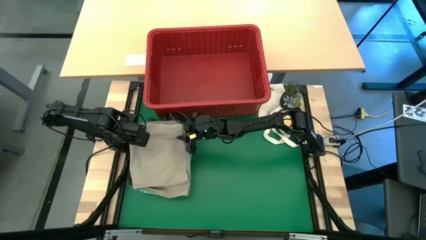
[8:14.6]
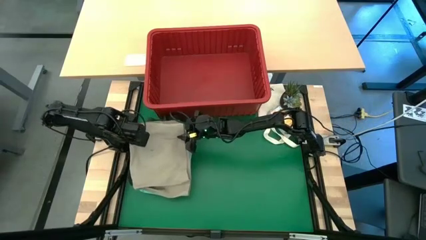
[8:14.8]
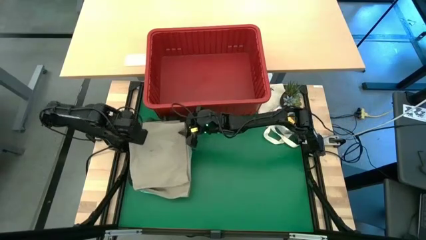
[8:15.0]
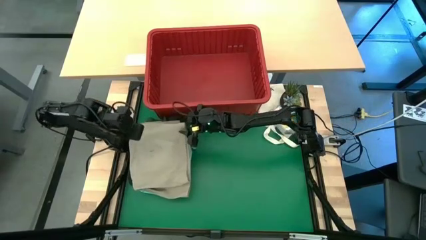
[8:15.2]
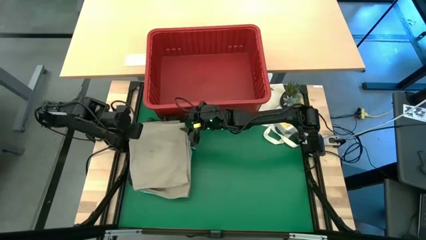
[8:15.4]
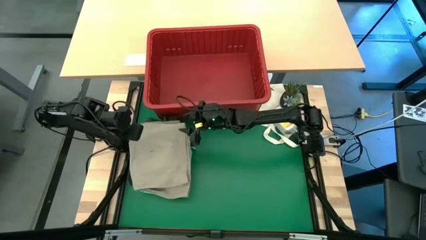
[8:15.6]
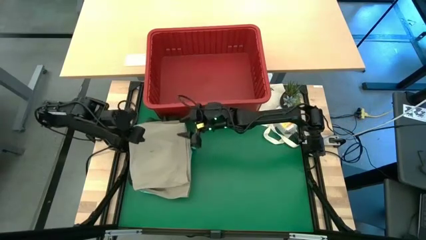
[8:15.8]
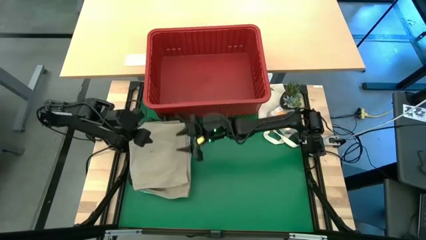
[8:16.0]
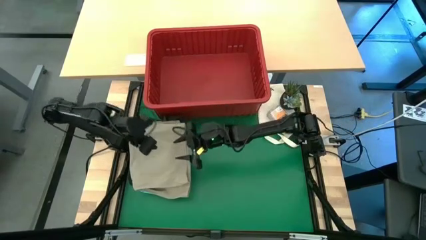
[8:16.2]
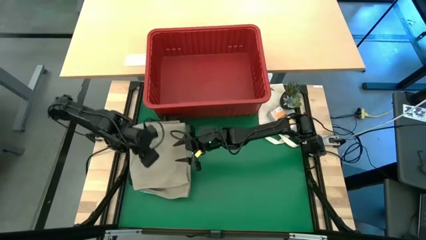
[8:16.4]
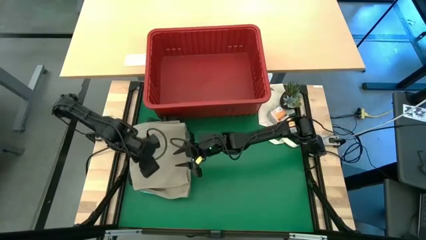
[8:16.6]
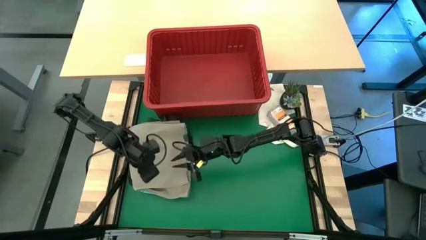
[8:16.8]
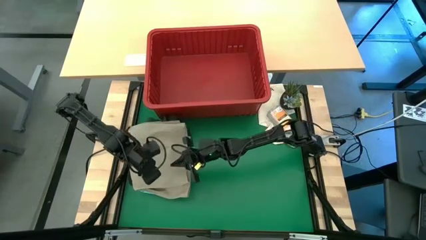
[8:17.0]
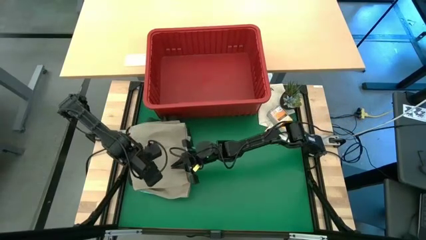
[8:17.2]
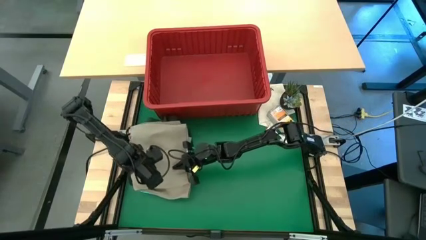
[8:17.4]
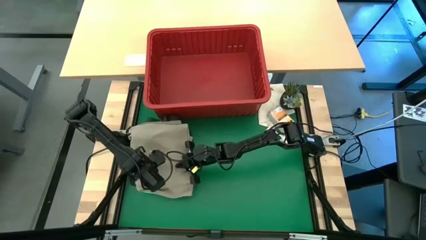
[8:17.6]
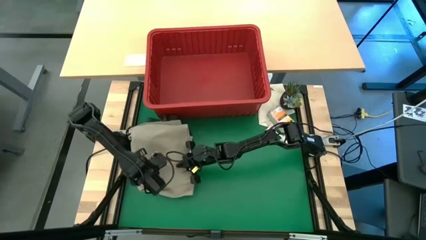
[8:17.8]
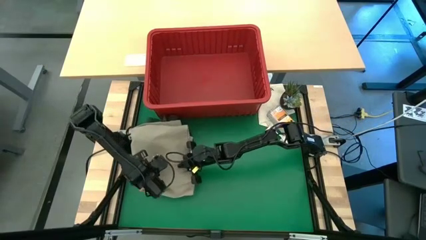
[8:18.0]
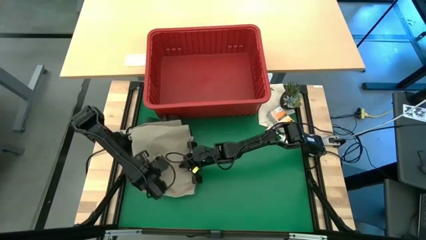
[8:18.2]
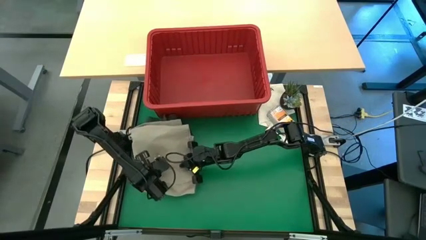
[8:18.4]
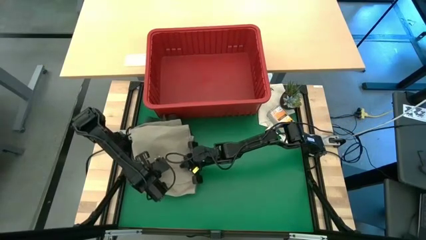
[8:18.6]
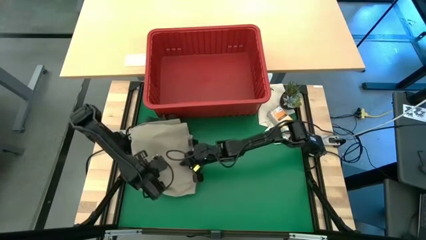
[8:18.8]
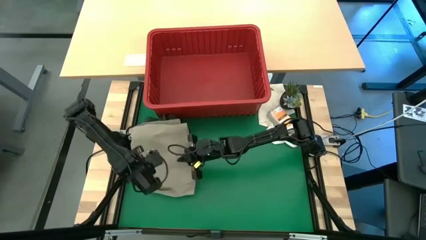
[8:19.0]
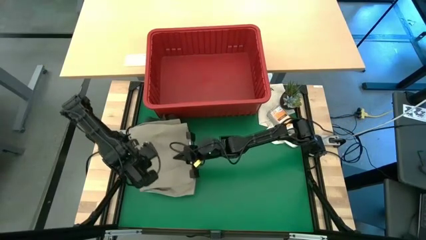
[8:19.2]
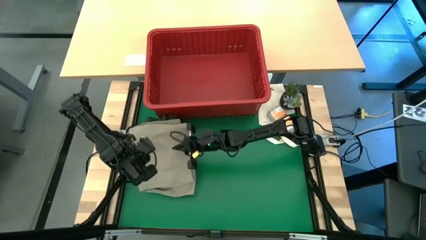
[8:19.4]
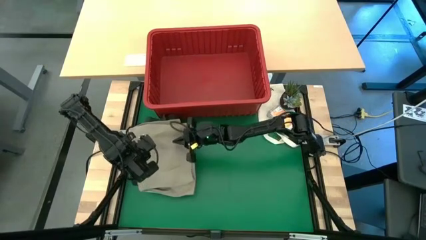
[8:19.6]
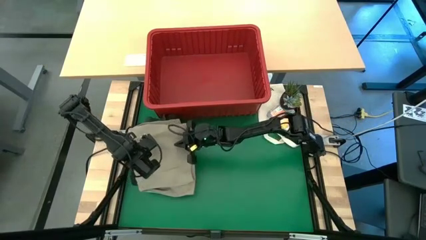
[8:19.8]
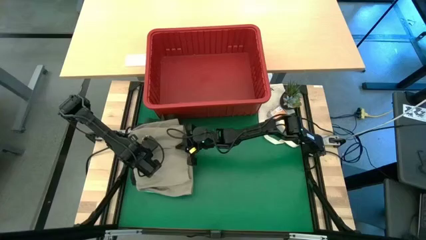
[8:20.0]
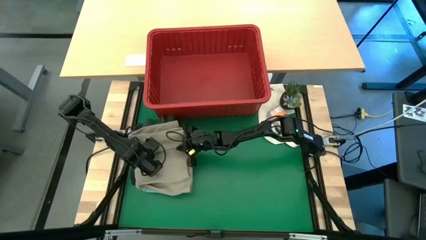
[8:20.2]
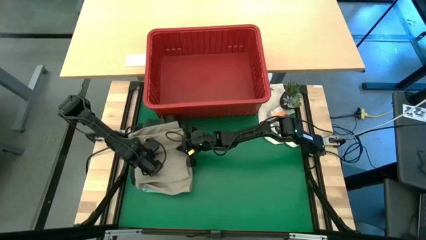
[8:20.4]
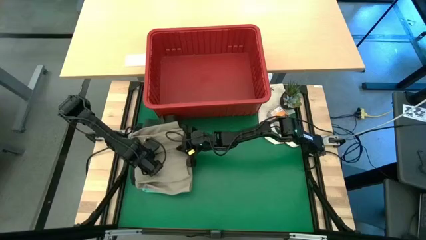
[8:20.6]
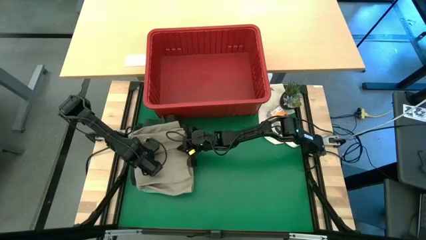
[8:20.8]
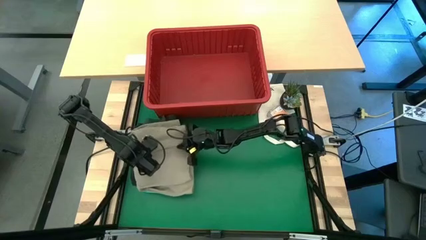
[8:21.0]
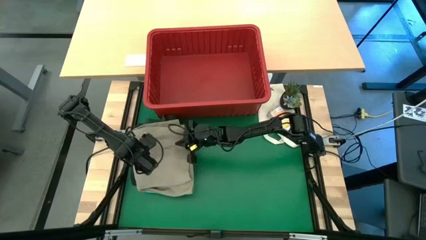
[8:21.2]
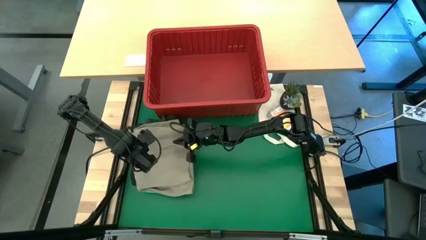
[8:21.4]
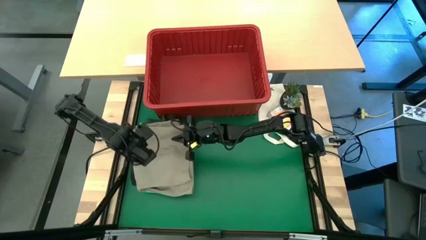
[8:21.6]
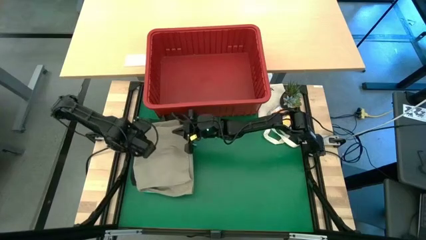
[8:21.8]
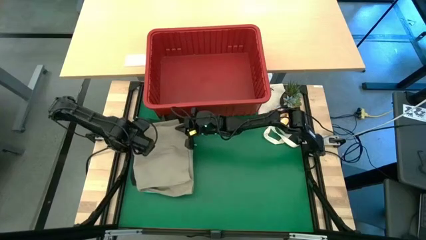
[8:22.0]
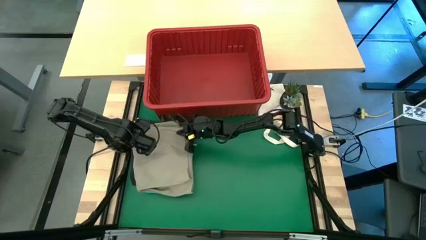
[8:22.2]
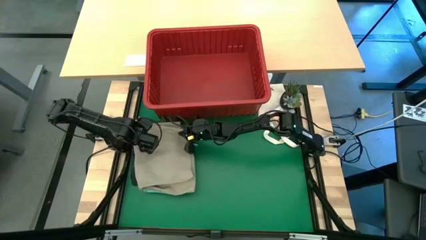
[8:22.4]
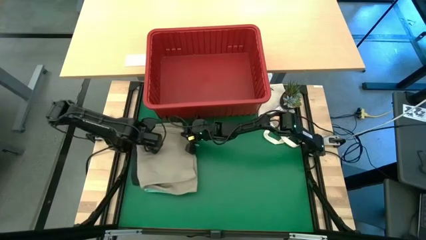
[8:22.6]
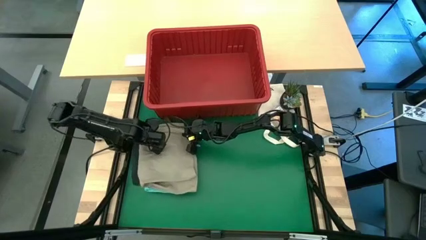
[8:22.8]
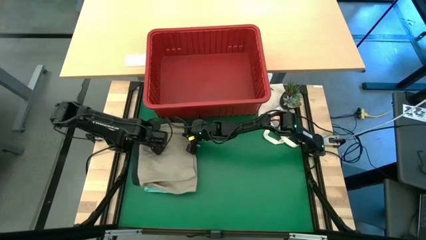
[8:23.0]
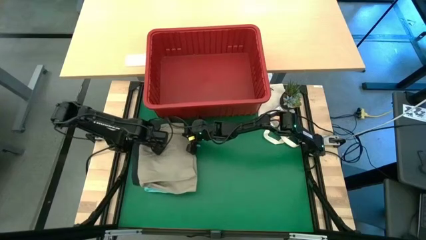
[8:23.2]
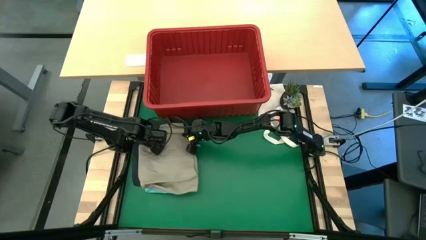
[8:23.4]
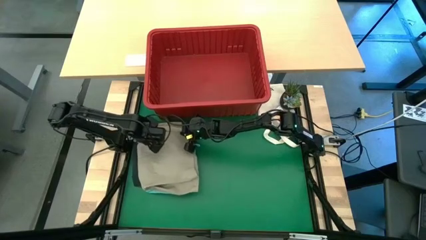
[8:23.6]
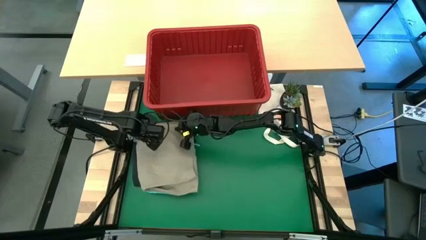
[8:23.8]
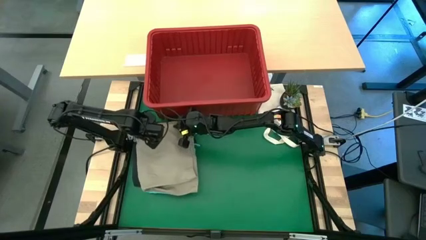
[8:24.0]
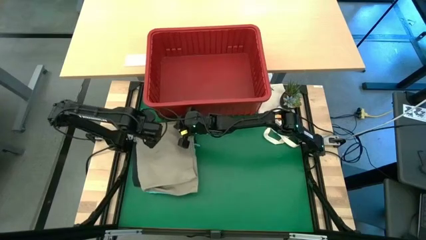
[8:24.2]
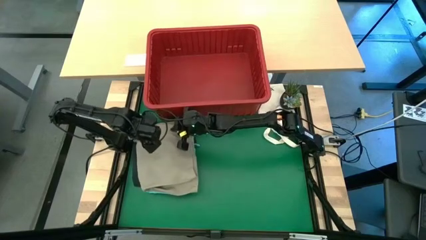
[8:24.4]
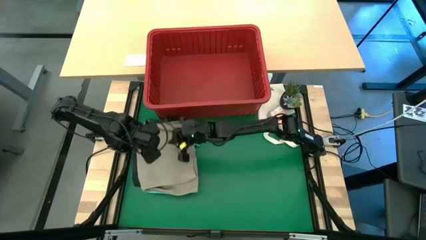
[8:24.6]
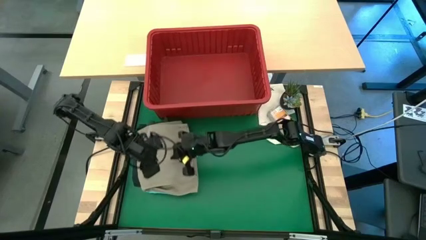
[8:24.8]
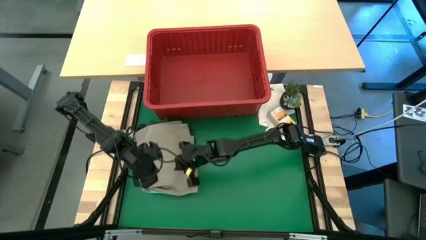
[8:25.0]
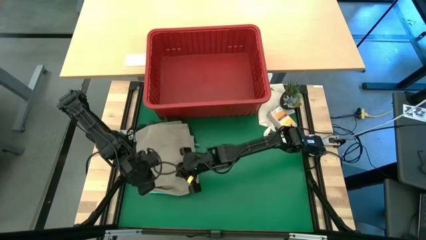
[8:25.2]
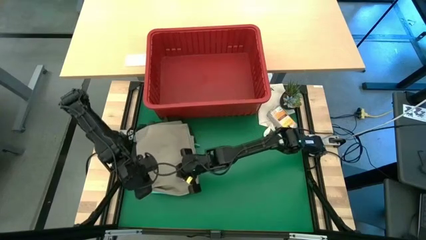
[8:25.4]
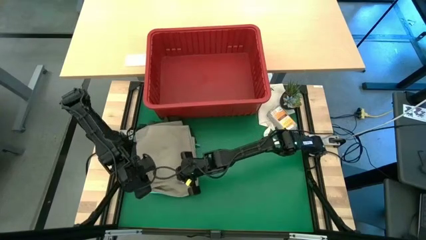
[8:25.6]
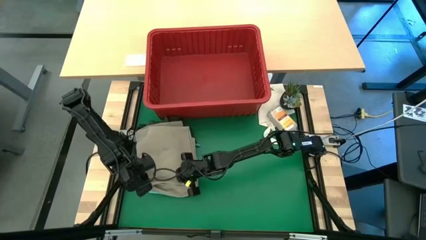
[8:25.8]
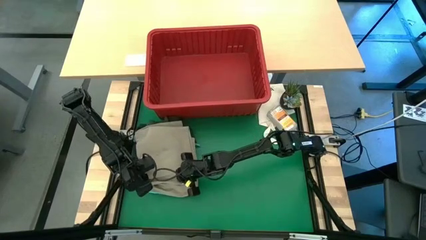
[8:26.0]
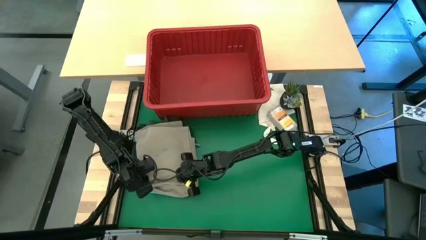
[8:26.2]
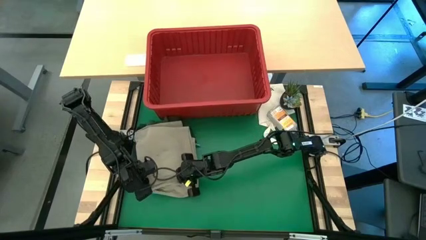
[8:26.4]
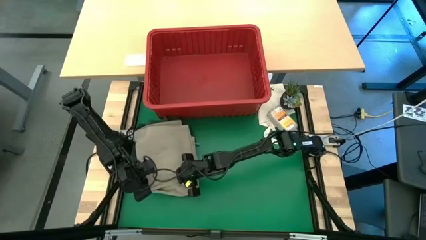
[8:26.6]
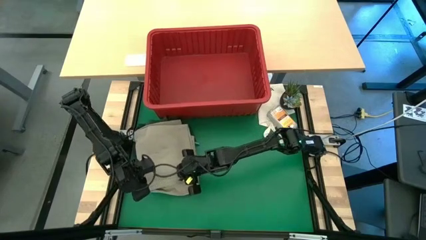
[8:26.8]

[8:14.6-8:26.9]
Task: Fold Laundry from Bin
Stack the folded brown shorts on top of the folded green polo shirt

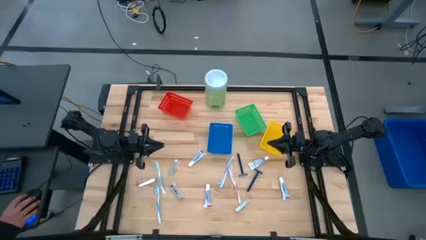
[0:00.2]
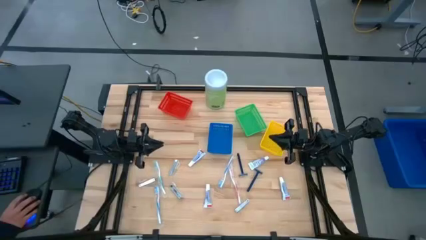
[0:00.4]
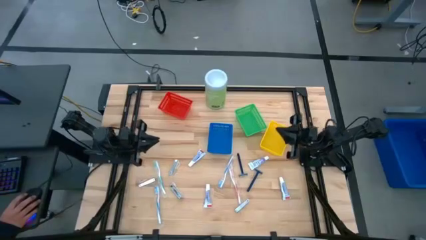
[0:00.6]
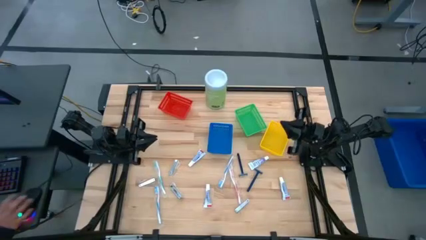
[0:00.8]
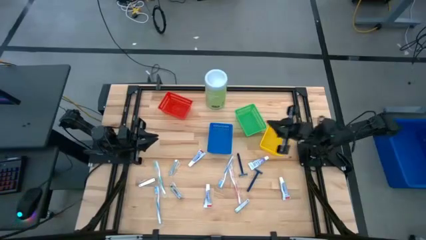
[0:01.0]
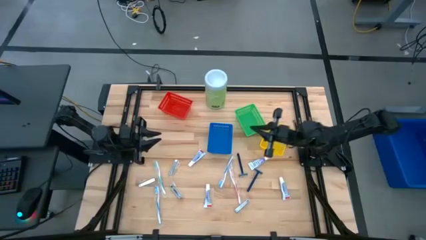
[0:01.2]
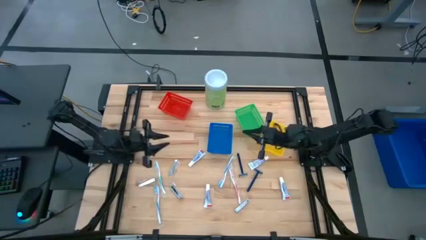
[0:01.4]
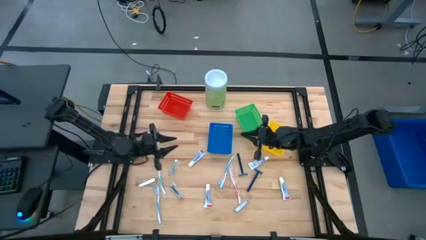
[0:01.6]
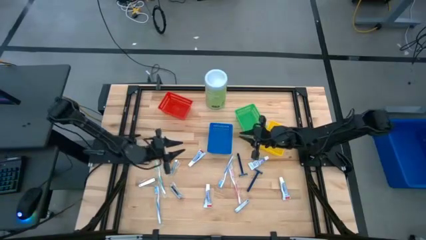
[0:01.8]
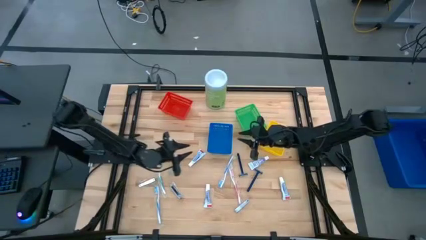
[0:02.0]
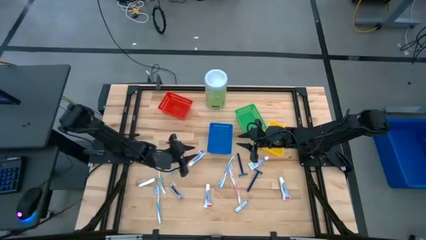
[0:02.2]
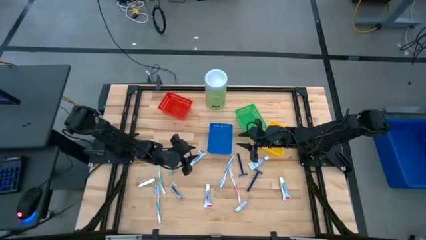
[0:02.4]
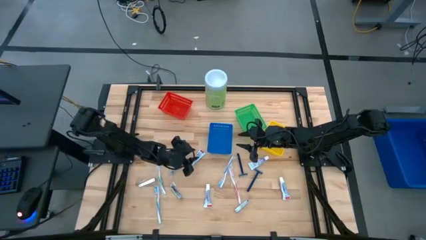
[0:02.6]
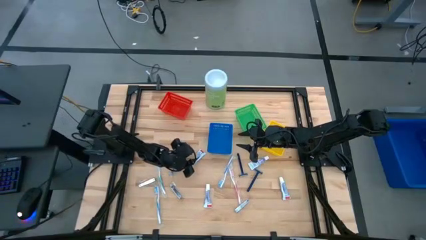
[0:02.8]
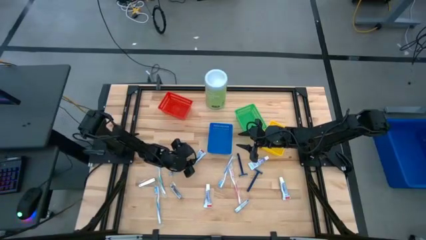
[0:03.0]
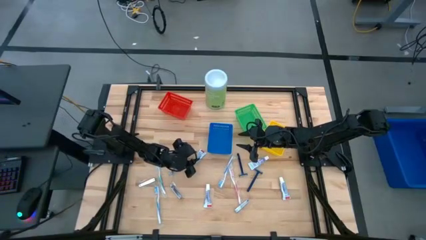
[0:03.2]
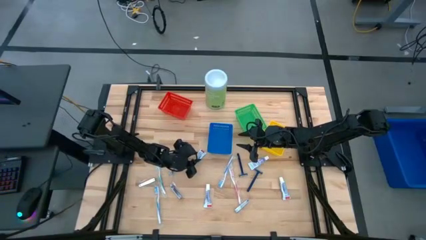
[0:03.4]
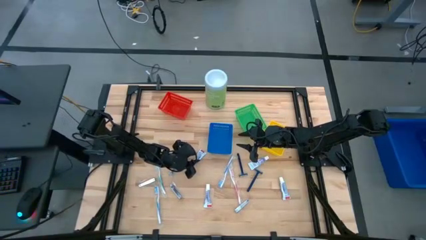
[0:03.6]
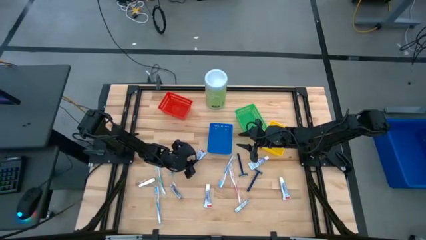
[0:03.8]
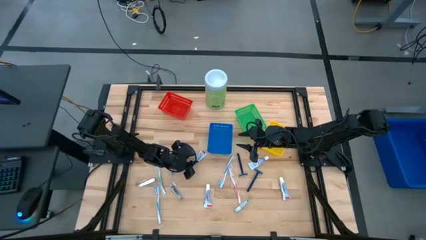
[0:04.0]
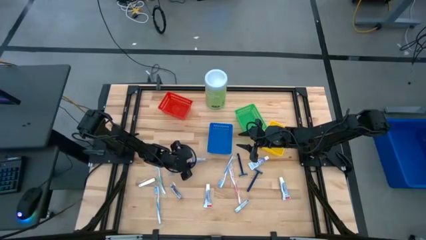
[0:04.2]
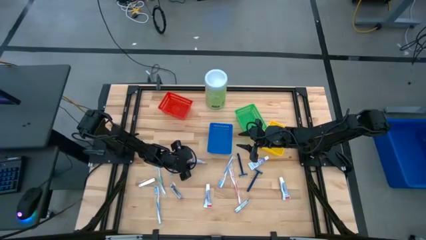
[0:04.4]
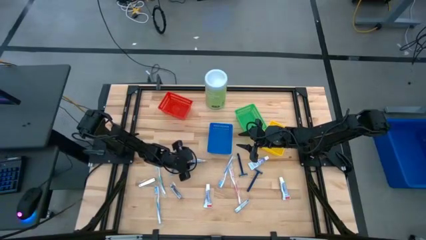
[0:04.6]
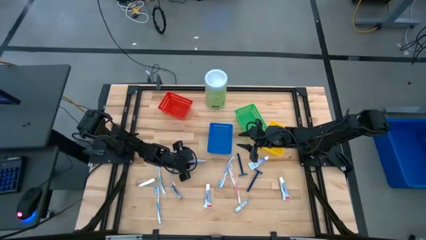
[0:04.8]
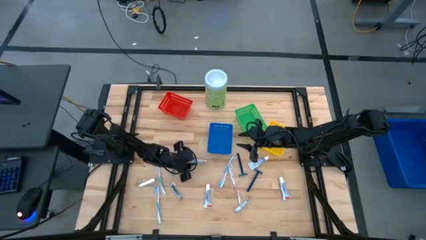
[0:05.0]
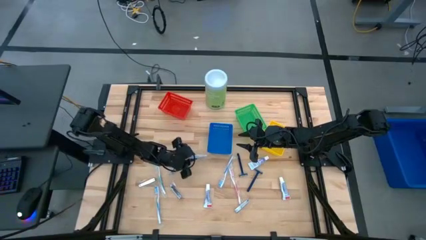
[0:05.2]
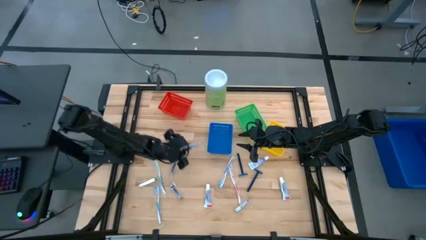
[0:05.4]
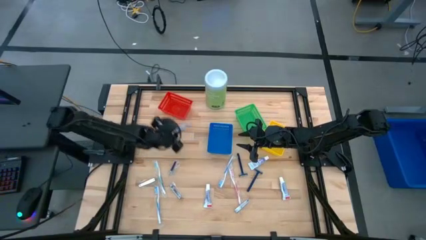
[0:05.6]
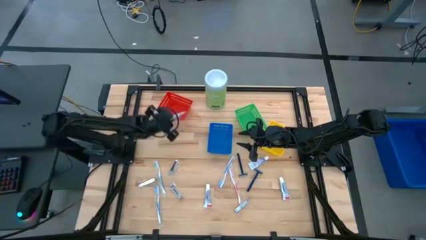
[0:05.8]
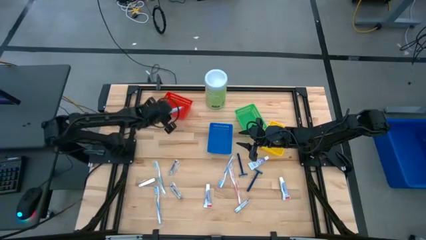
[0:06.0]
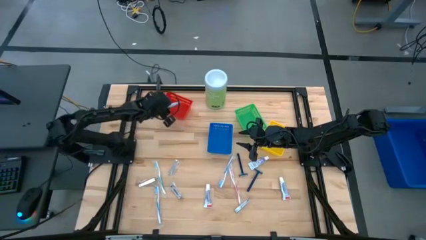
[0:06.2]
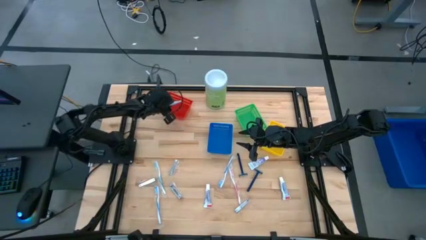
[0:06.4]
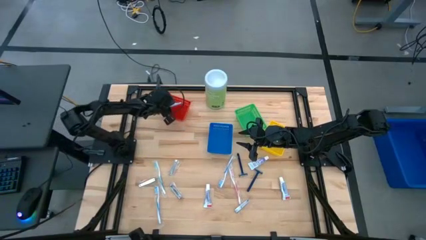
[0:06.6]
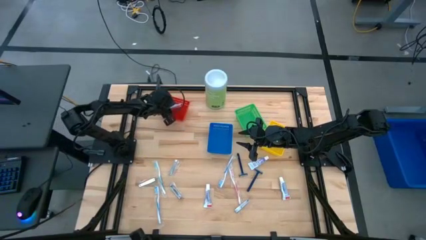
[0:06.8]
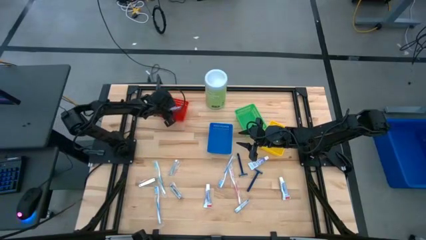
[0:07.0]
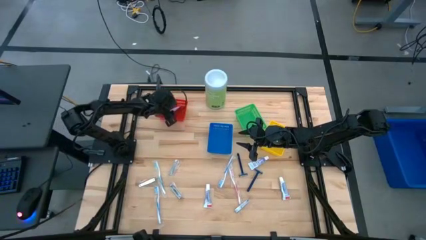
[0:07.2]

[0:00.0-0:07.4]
Task: Pick & Place Travel size toiletries
Put the white toothpaste into the red bin
